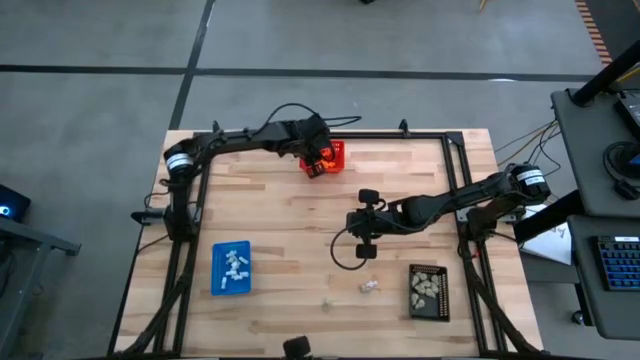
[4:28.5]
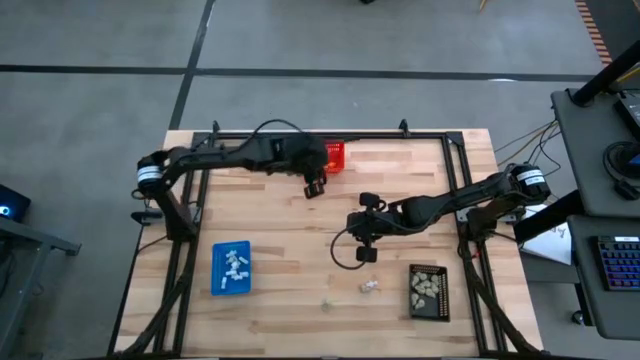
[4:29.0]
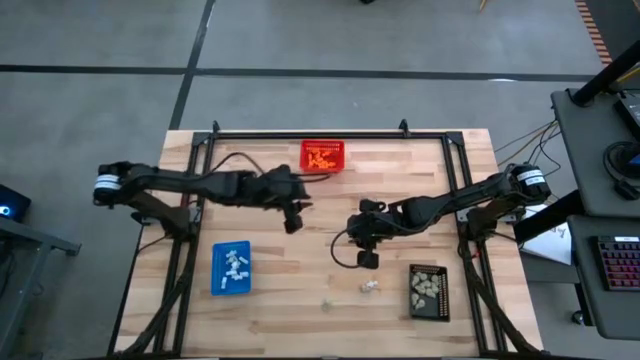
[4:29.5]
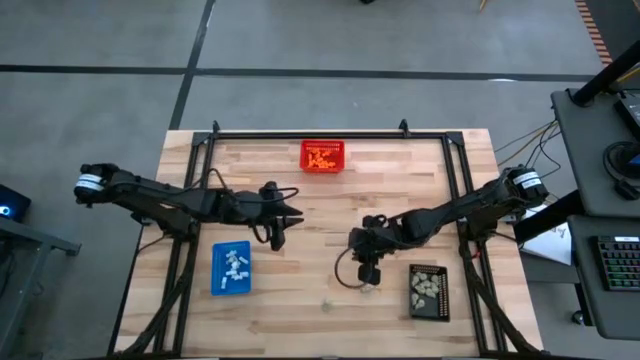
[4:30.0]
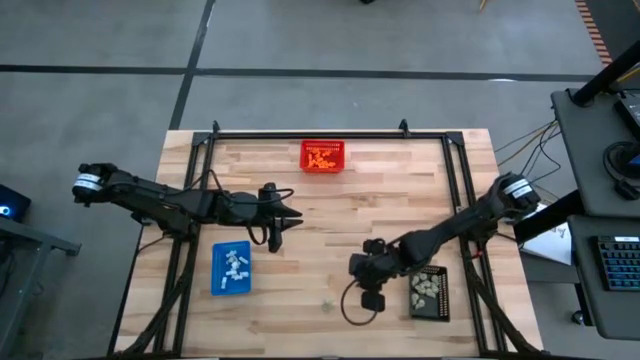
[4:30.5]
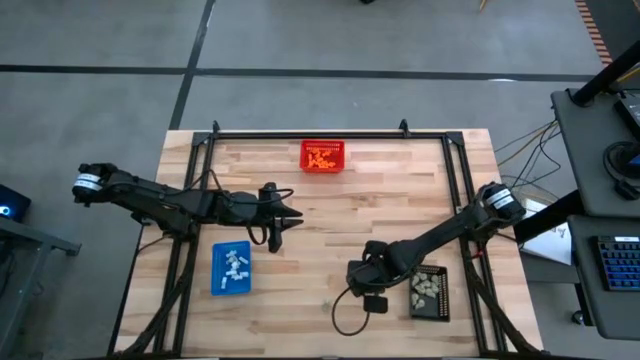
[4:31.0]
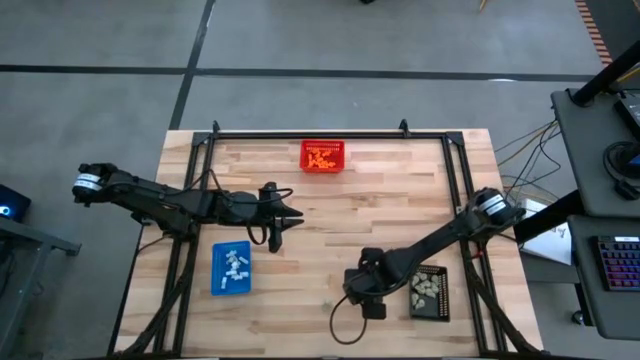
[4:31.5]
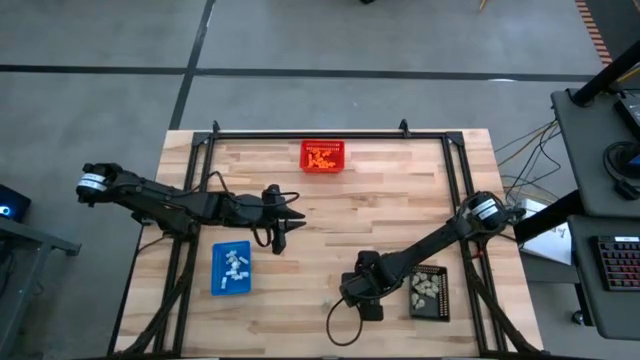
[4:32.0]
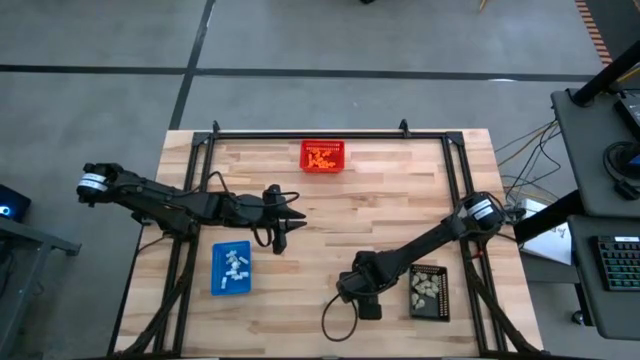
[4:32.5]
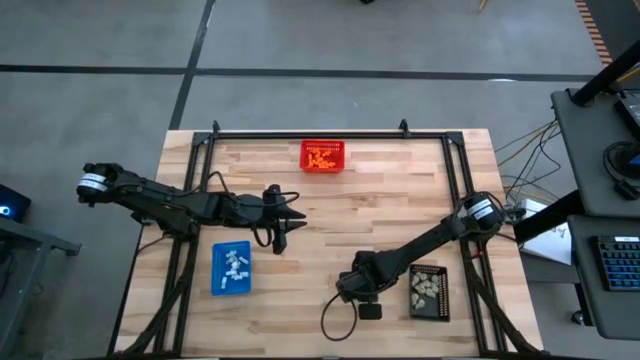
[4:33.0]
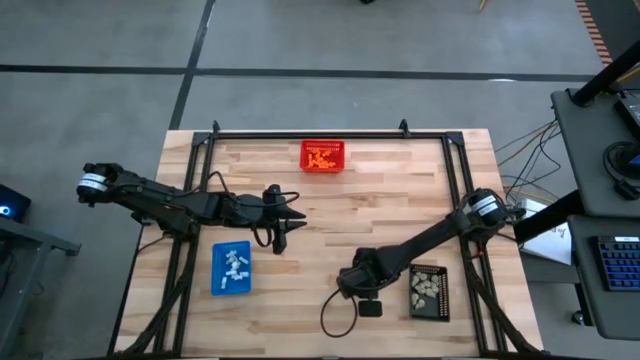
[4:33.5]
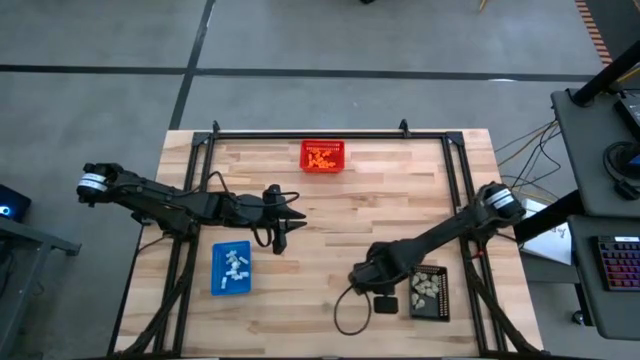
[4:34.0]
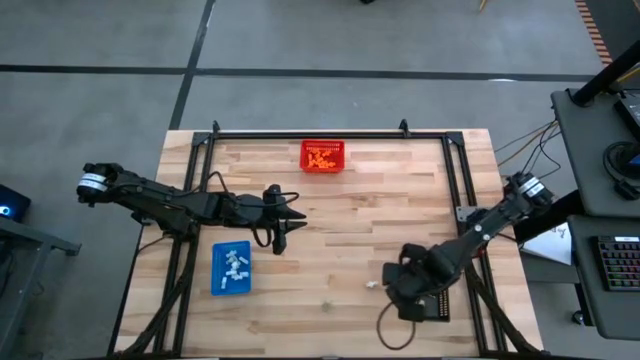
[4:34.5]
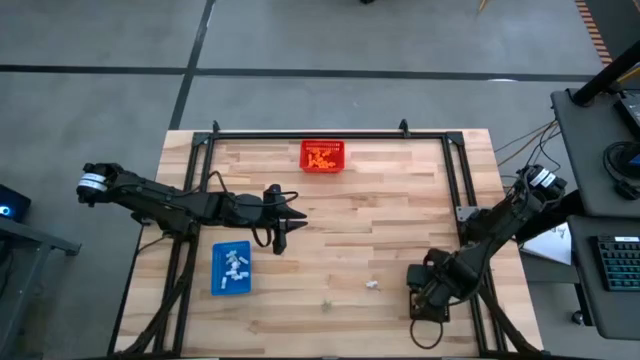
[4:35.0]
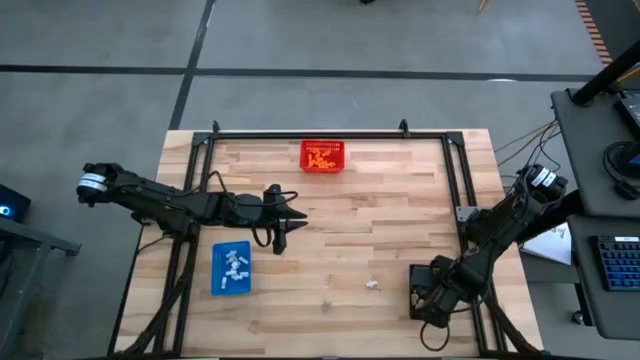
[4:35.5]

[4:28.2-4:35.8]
Task: Sort Halloween decoration
Put the gray skull toy into the black bin

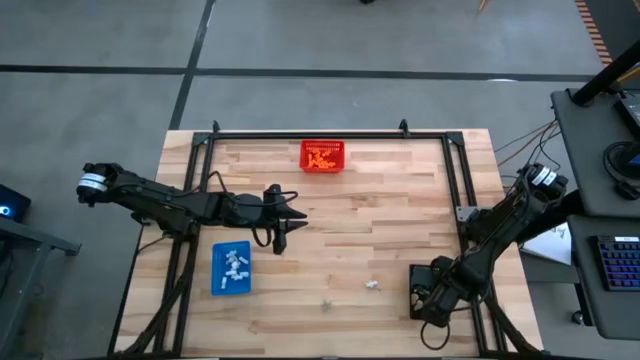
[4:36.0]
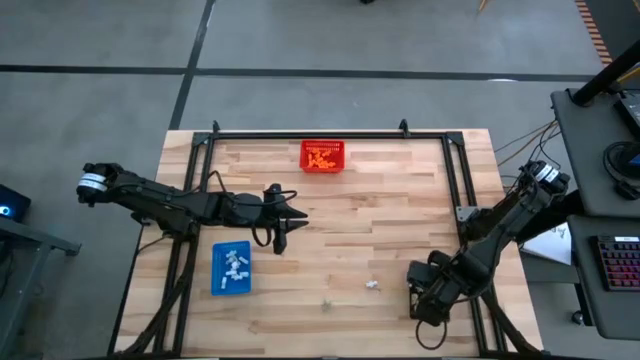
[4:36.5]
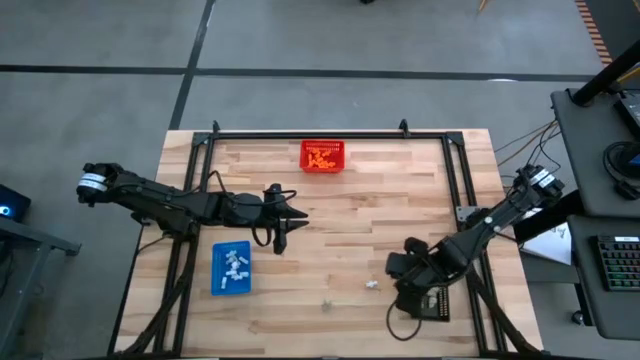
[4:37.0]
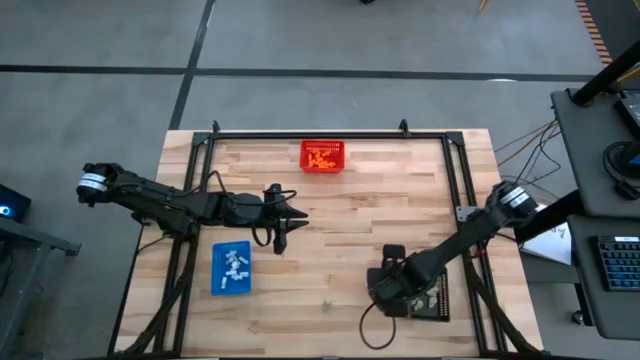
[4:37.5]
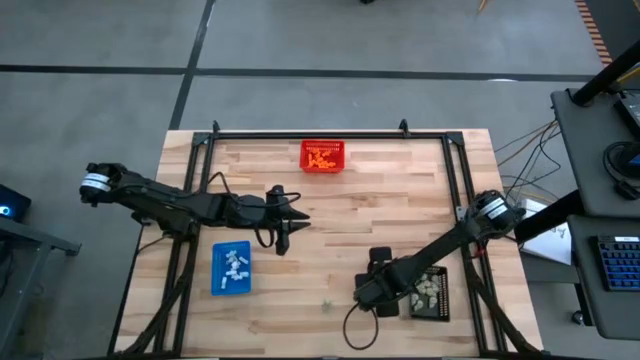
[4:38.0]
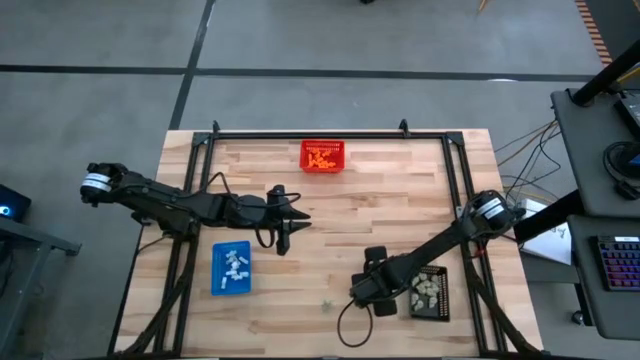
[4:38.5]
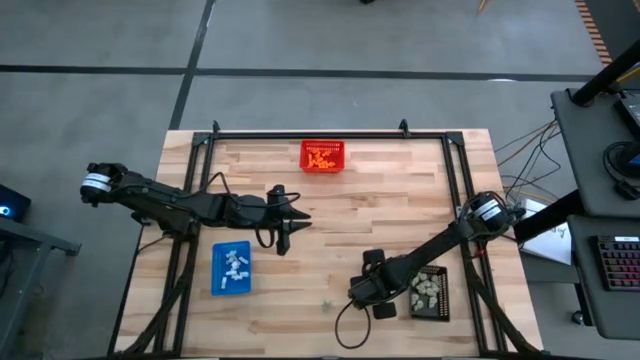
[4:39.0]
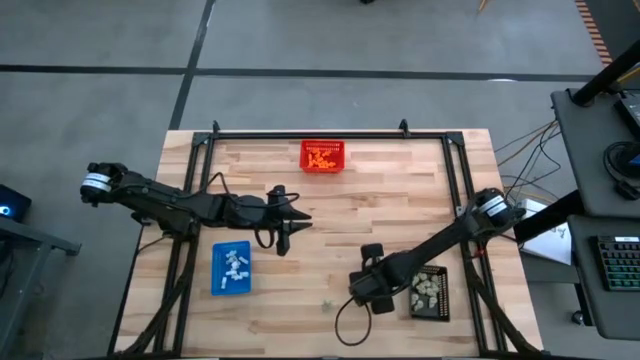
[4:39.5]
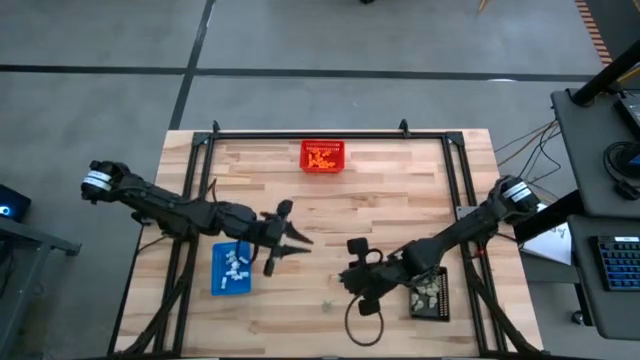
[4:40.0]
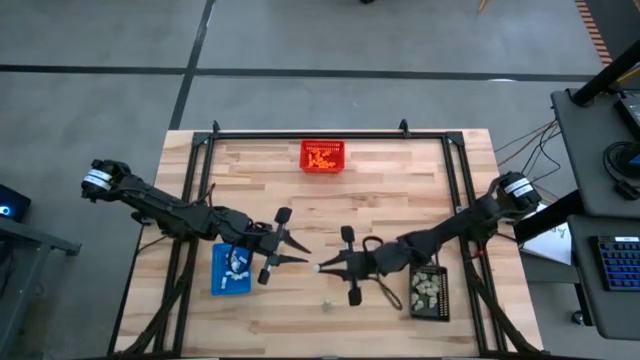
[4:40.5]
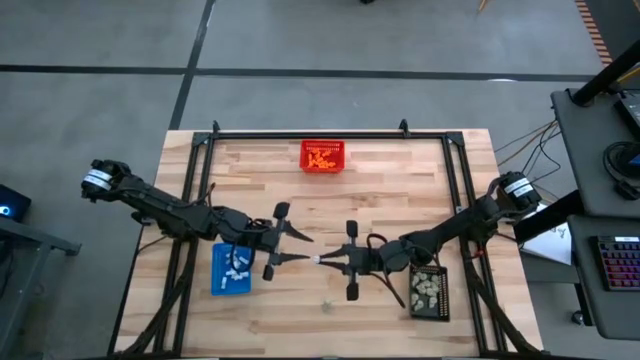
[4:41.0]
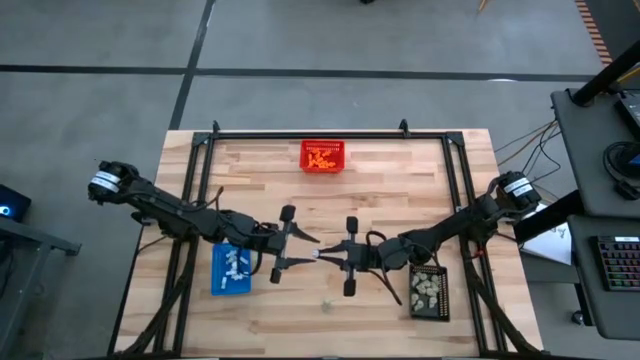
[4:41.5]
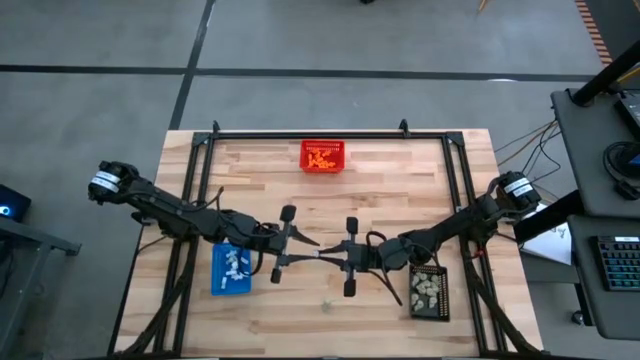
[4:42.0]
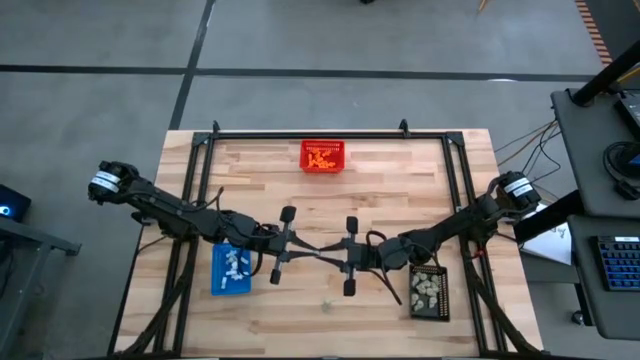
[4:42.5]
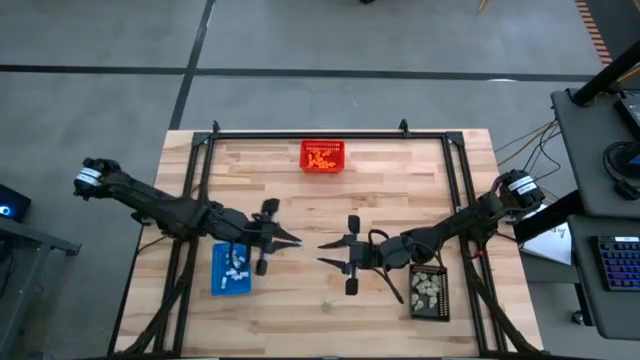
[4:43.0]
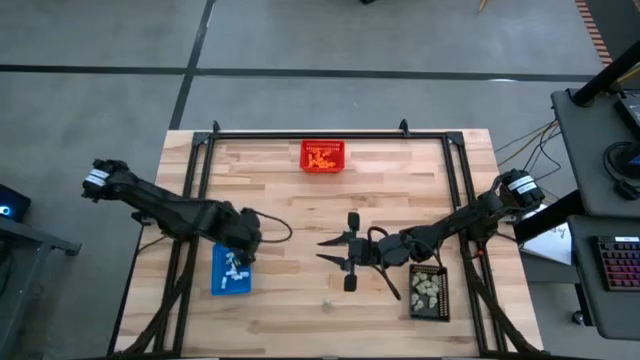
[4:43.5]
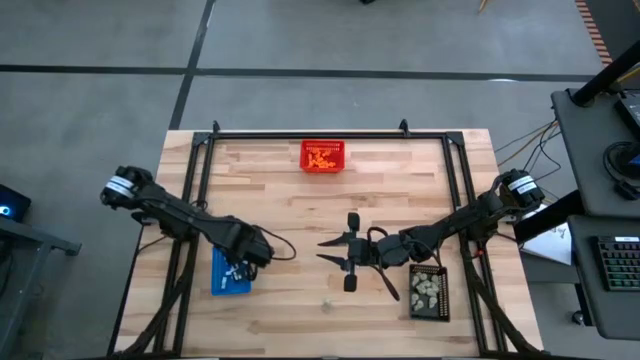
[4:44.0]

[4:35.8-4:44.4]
Put the white skeleton toy into the blue bin

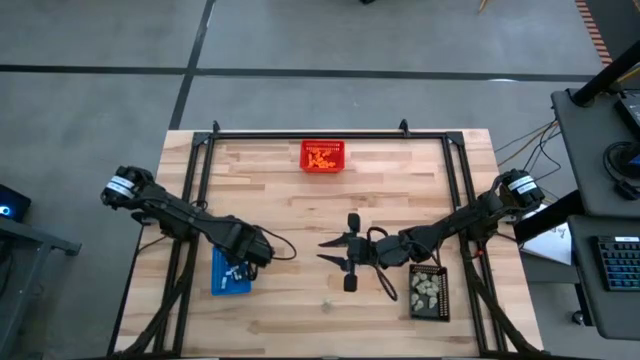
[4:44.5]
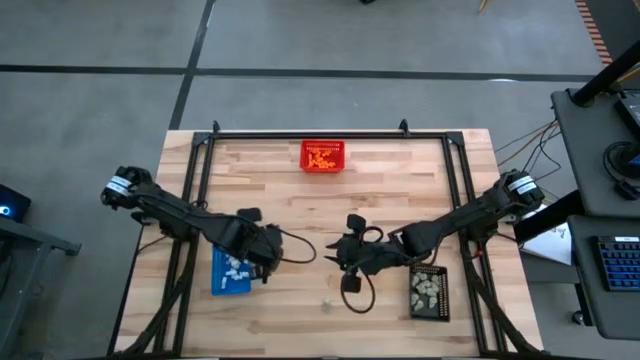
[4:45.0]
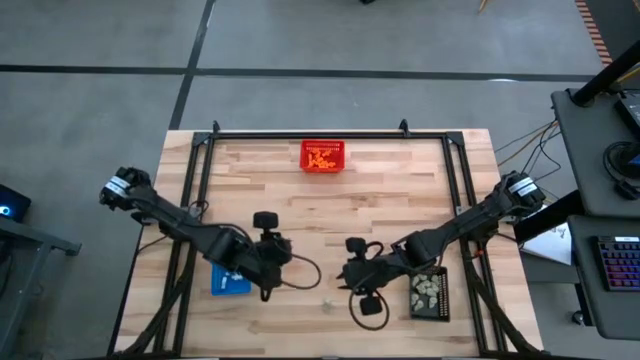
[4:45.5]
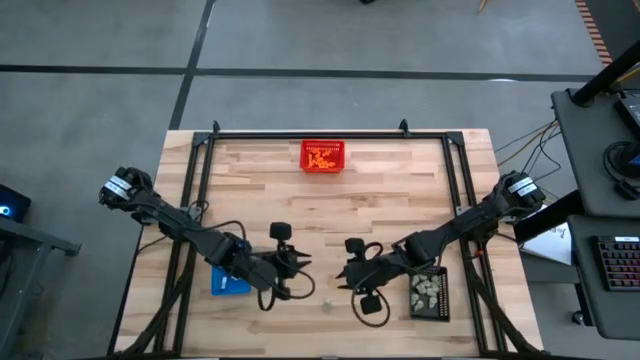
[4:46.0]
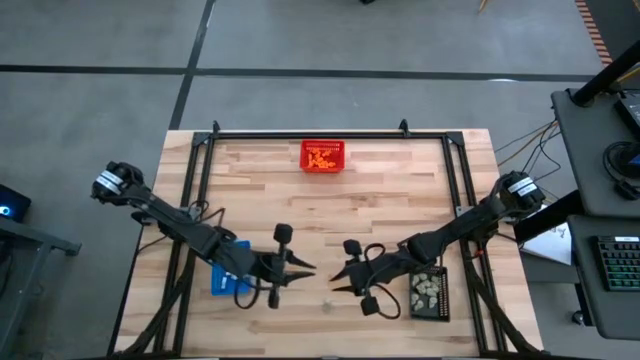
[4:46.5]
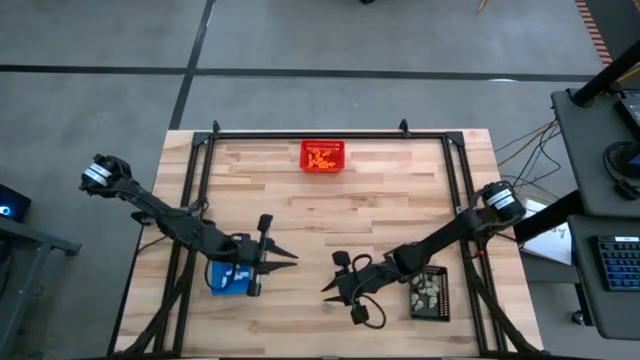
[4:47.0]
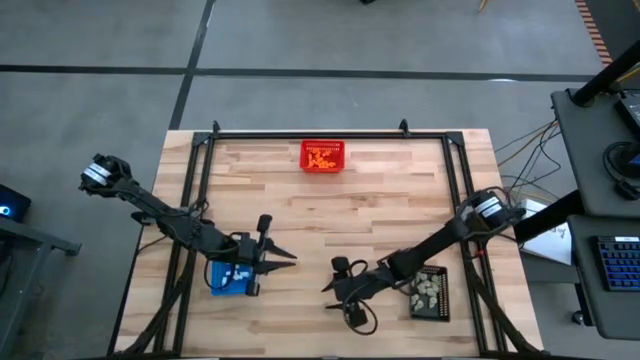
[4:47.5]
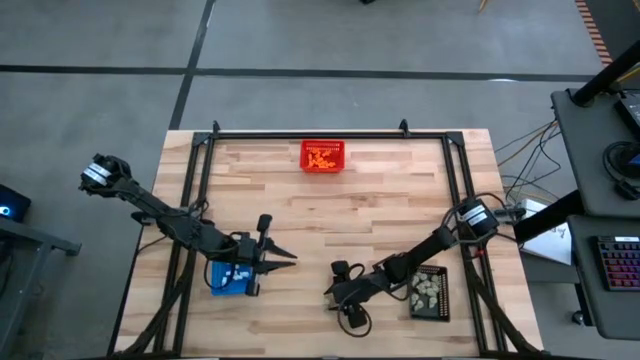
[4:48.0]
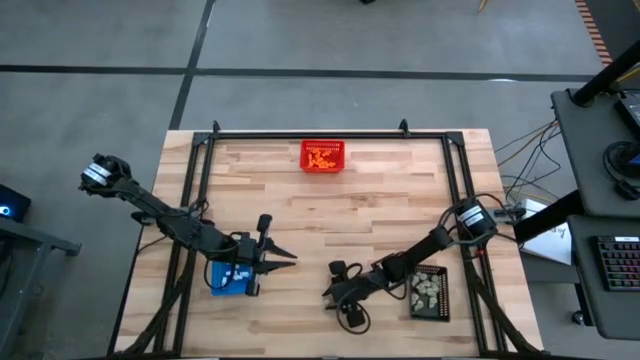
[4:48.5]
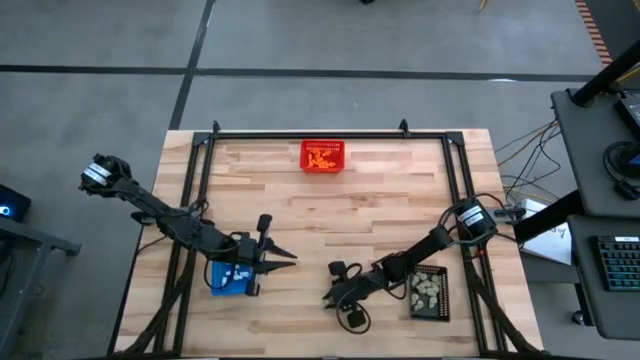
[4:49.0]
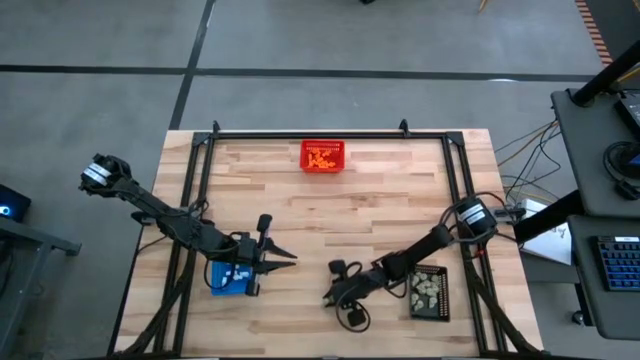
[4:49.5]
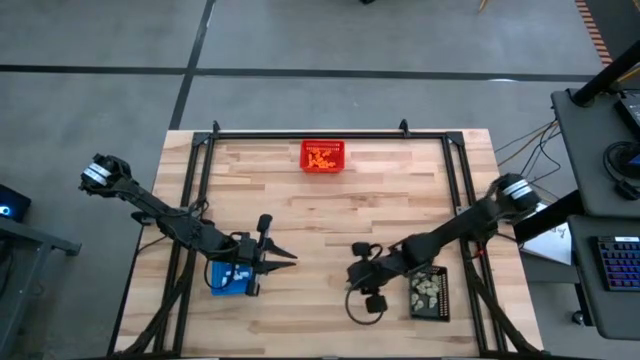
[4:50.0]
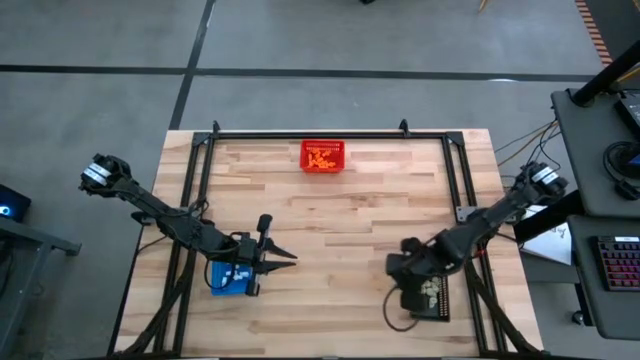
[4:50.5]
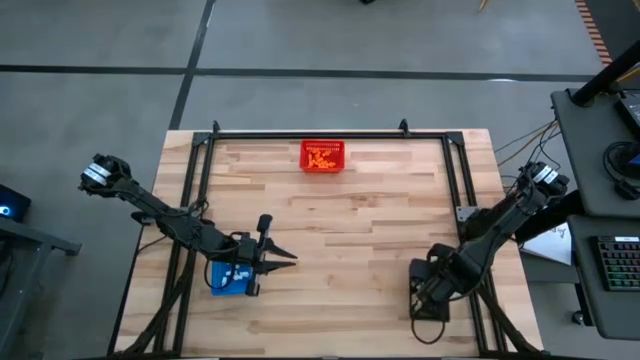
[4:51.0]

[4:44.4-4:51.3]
Put the gray skull toy into the black bin
